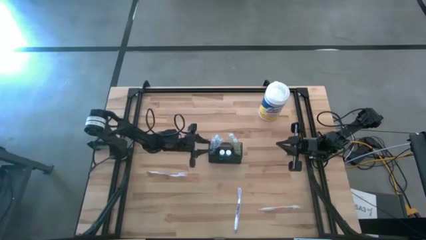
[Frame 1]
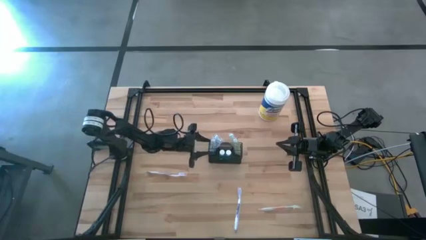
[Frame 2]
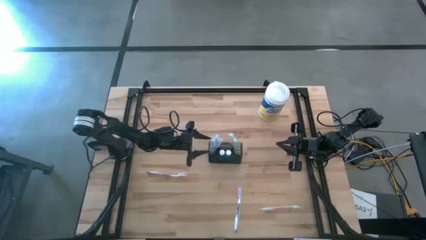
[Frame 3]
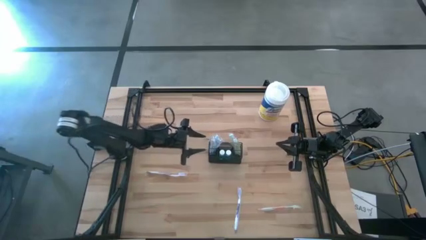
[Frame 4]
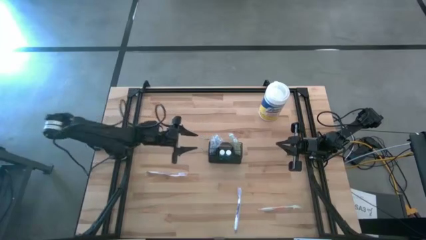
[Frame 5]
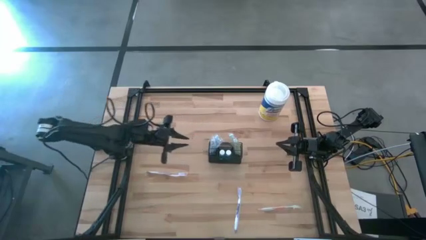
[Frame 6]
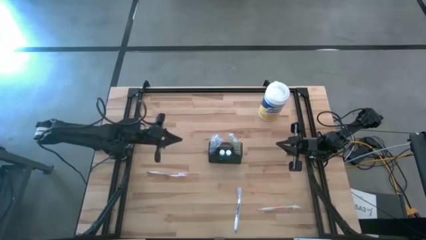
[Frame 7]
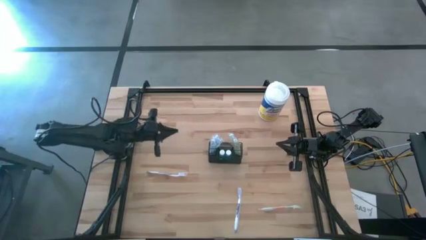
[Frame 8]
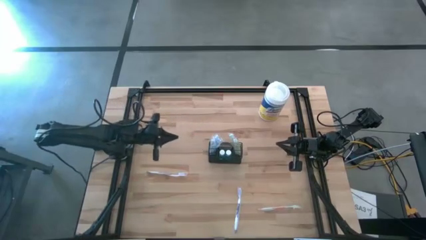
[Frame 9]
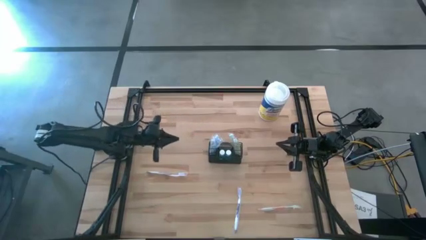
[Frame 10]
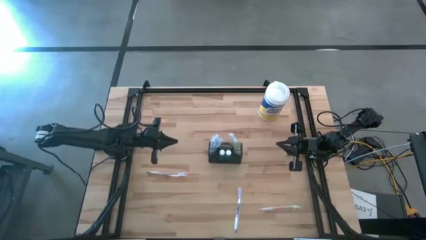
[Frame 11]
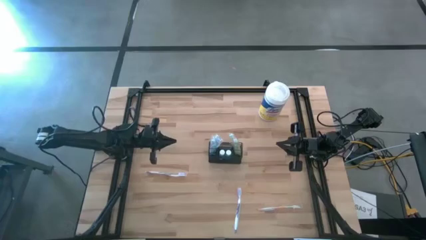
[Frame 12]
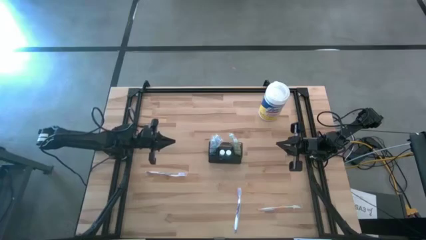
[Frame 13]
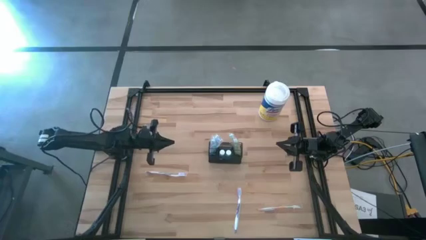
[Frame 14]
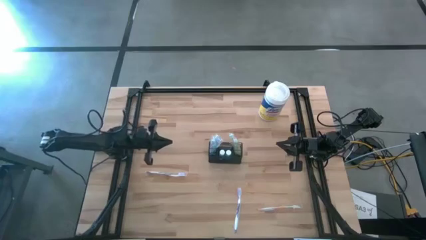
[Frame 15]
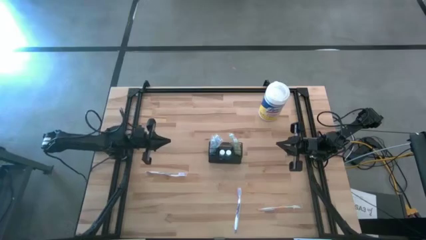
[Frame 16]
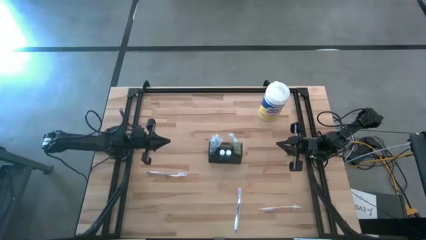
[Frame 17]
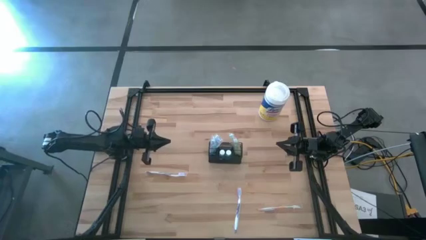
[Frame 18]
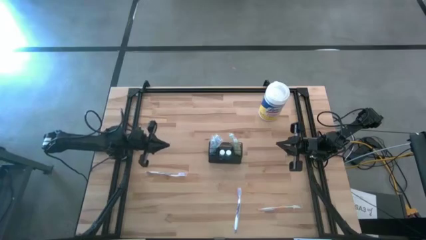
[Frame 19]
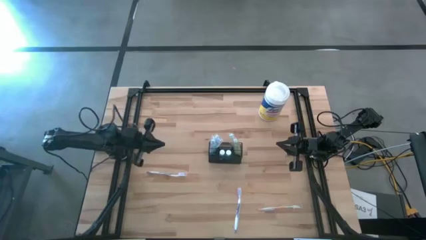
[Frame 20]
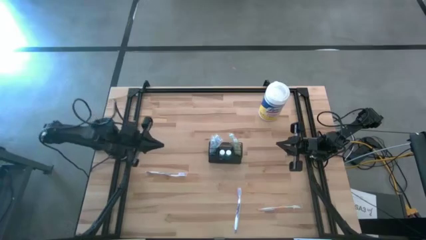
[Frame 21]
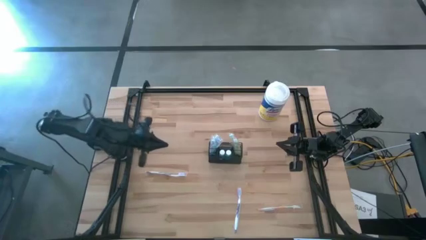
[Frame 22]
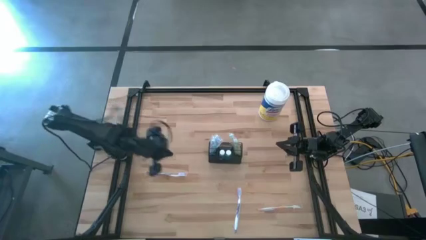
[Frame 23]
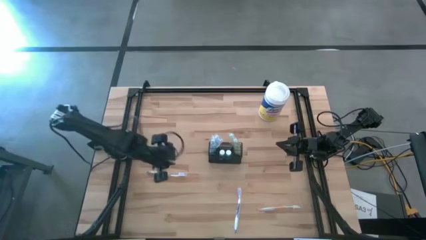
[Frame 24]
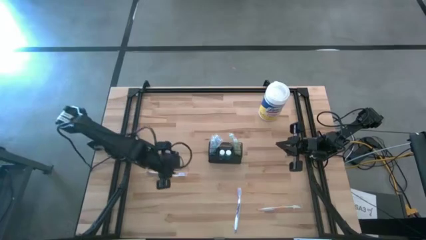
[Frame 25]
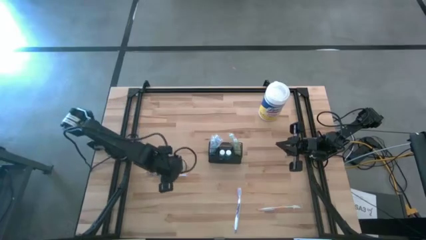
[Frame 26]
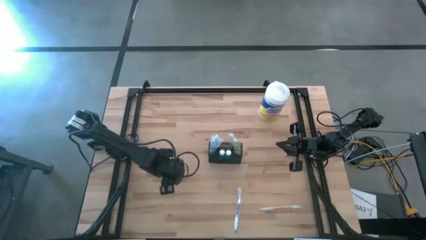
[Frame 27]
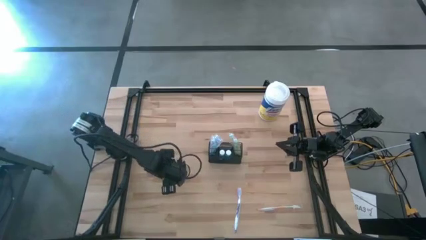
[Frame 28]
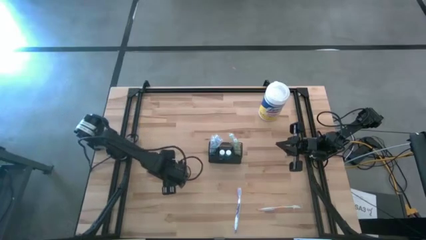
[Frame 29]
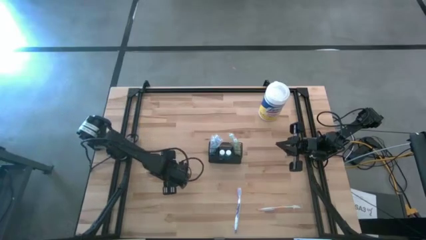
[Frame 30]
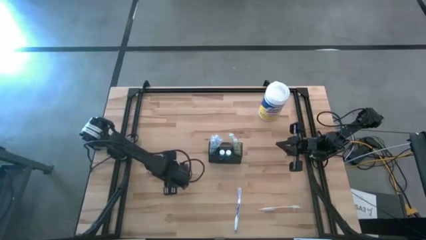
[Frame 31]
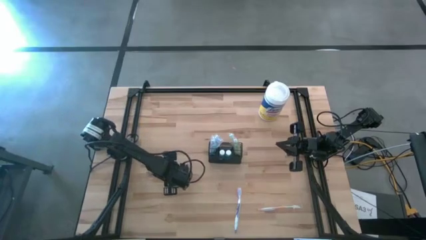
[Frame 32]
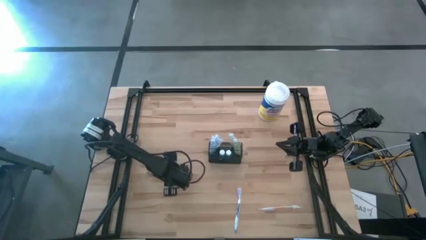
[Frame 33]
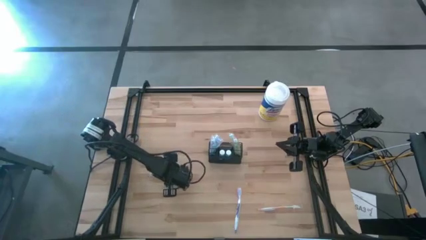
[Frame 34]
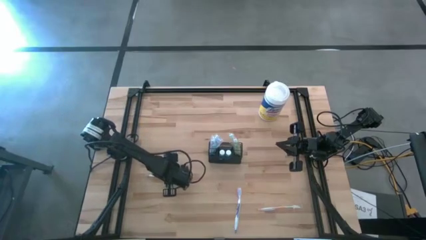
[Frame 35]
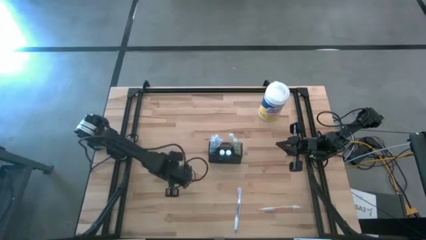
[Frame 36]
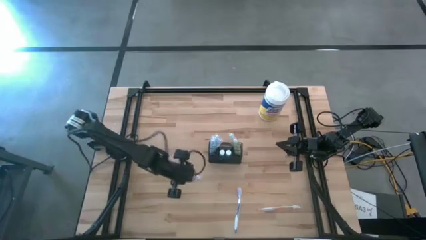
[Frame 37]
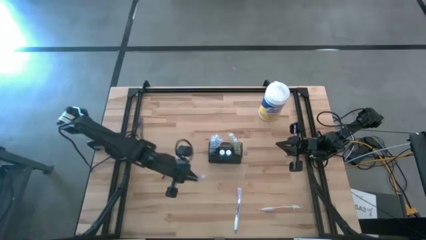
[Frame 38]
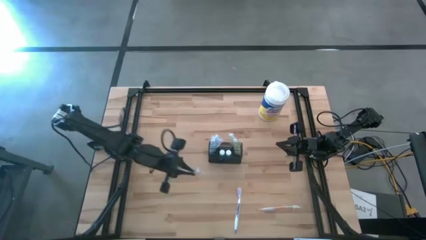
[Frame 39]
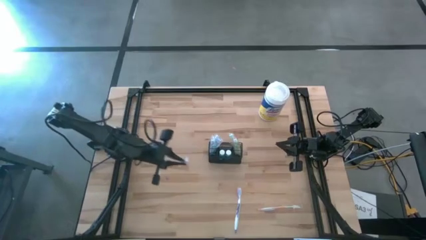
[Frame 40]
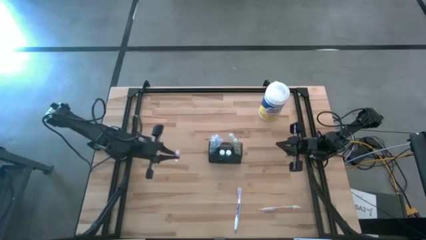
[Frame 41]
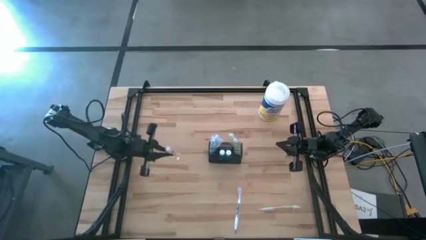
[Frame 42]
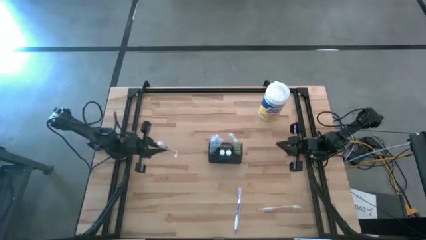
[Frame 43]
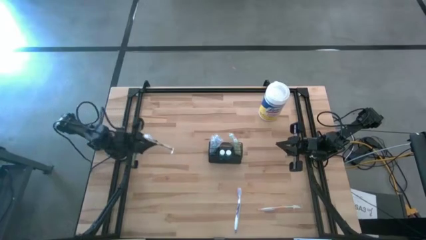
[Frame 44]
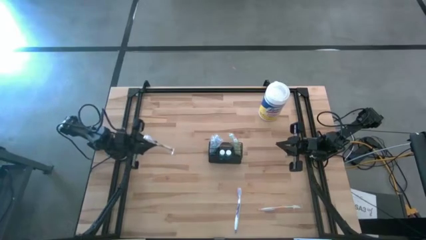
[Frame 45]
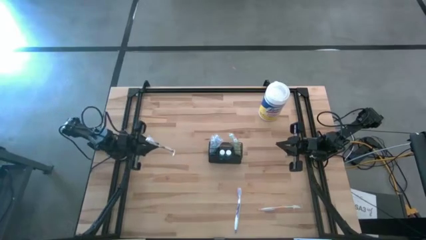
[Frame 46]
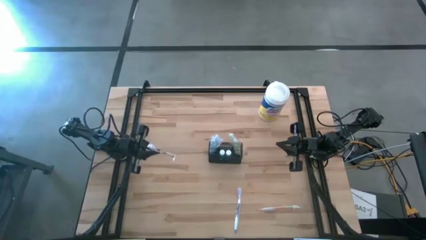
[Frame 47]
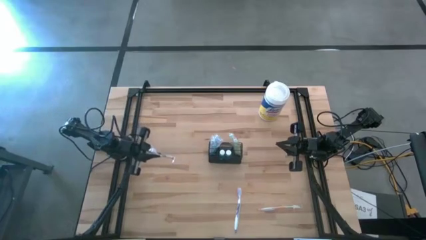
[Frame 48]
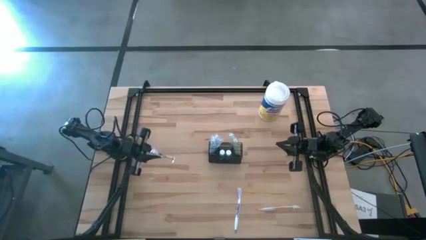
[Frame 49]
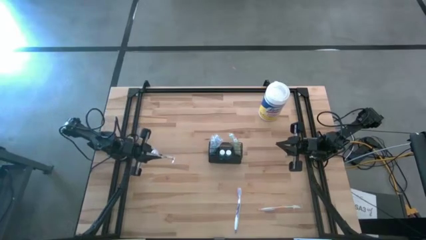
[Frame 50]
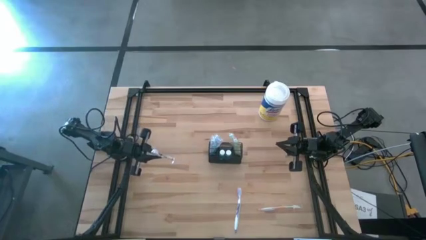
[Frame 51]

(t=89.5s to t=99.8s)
Task: Pick & Place toothbrushing station
Put the purple toothbrush into the wire organizer
